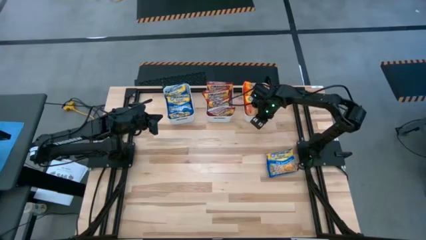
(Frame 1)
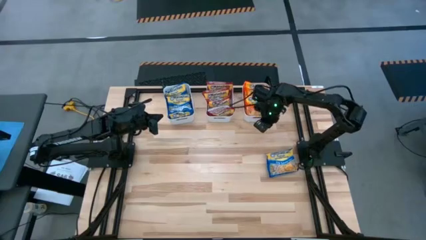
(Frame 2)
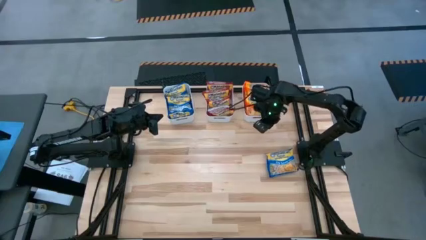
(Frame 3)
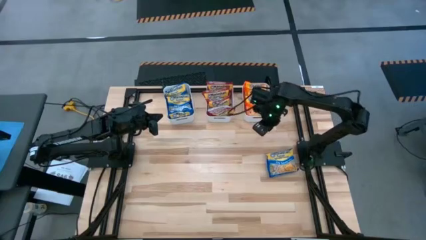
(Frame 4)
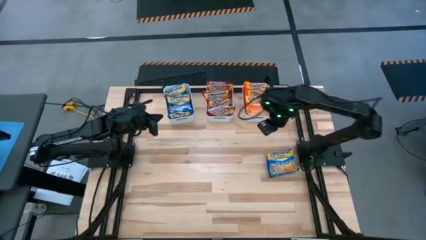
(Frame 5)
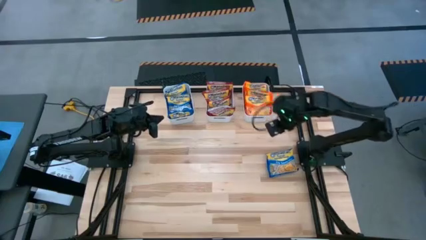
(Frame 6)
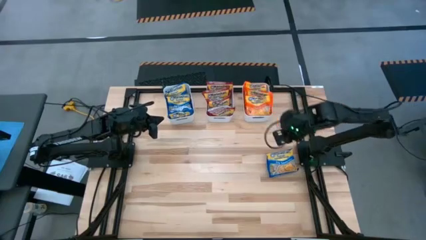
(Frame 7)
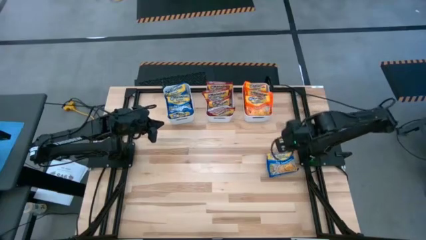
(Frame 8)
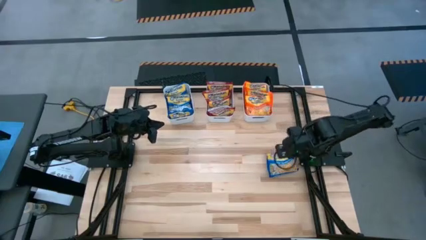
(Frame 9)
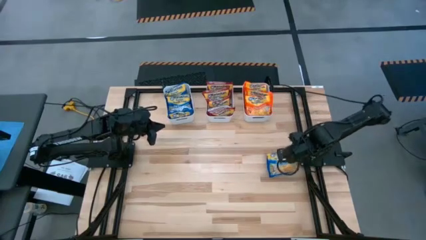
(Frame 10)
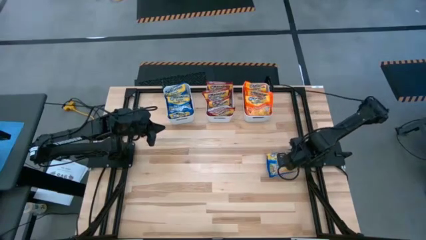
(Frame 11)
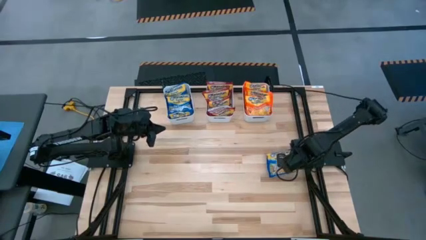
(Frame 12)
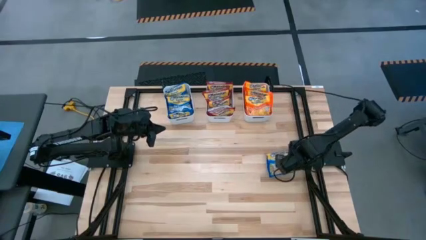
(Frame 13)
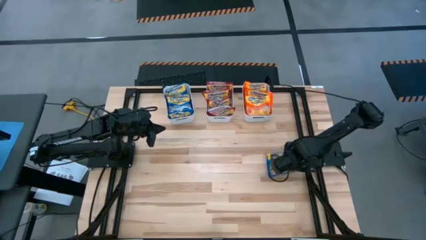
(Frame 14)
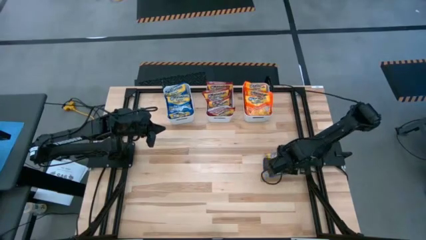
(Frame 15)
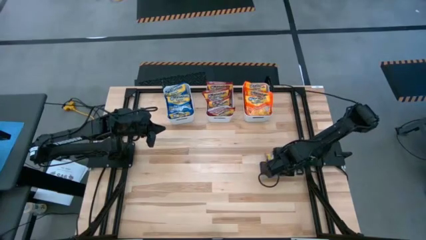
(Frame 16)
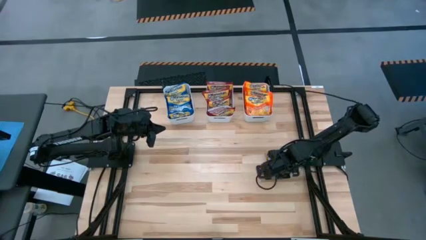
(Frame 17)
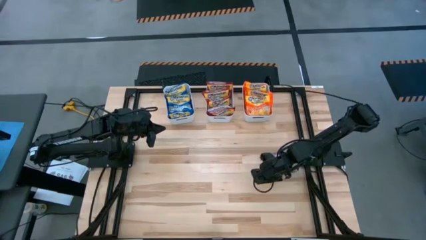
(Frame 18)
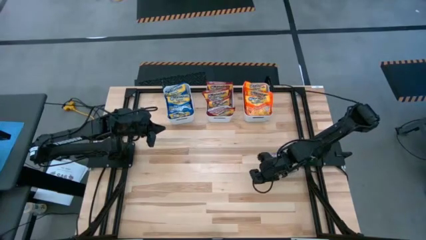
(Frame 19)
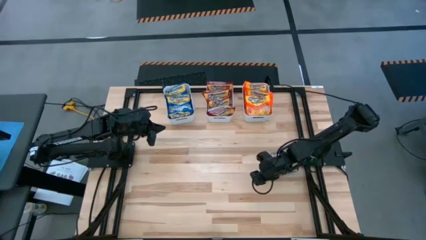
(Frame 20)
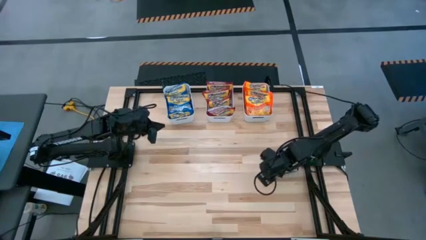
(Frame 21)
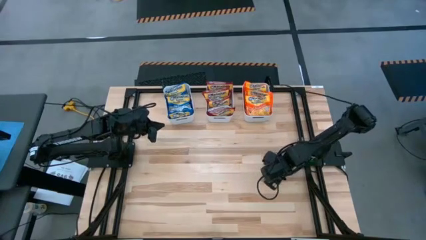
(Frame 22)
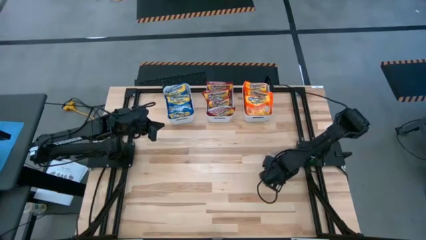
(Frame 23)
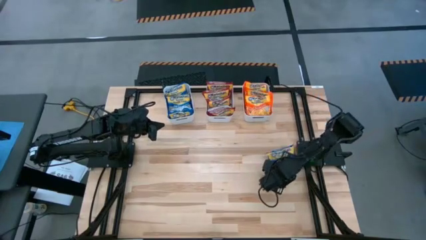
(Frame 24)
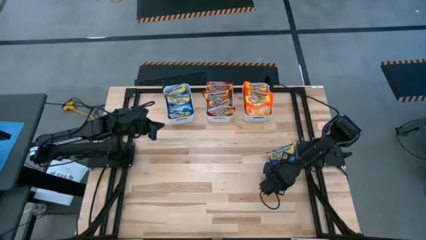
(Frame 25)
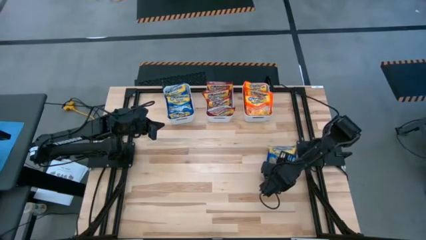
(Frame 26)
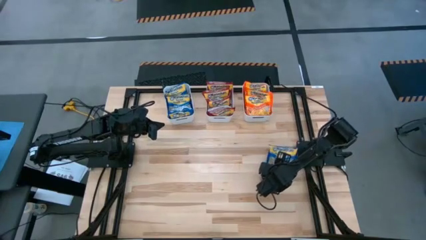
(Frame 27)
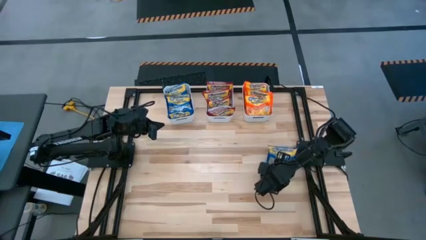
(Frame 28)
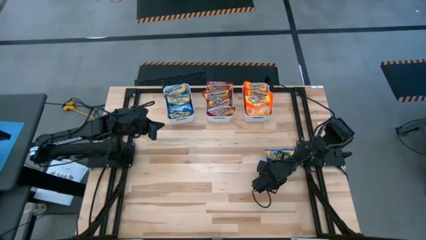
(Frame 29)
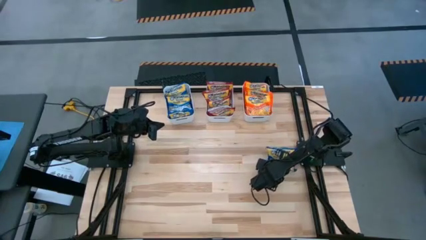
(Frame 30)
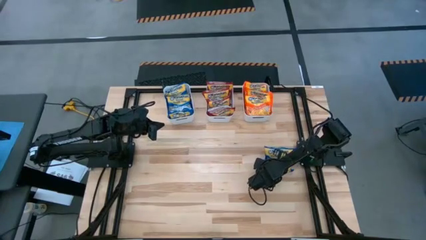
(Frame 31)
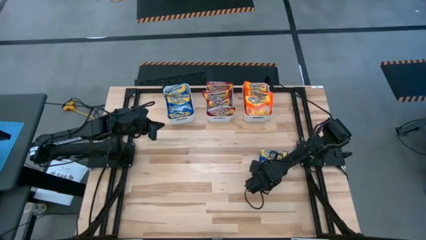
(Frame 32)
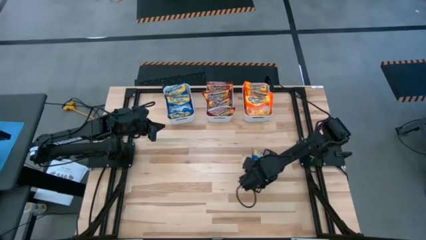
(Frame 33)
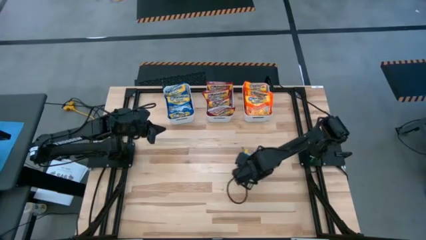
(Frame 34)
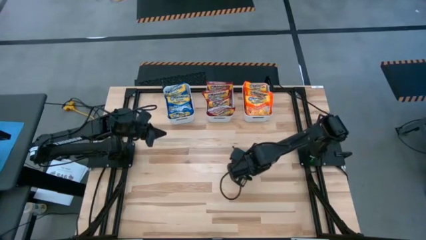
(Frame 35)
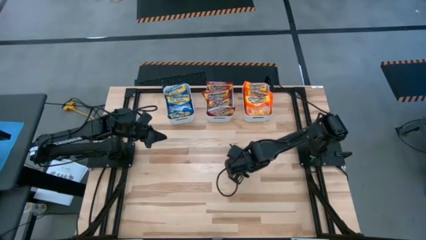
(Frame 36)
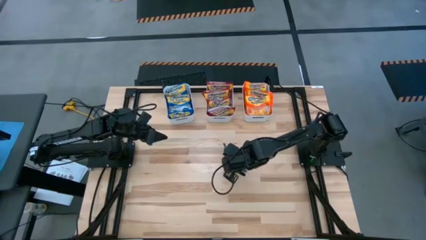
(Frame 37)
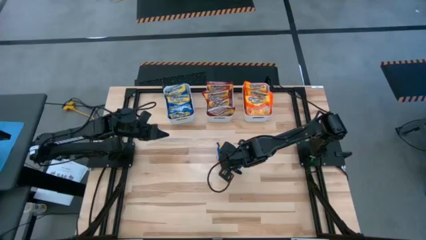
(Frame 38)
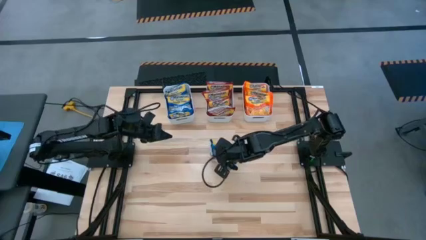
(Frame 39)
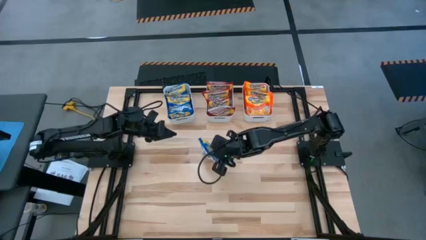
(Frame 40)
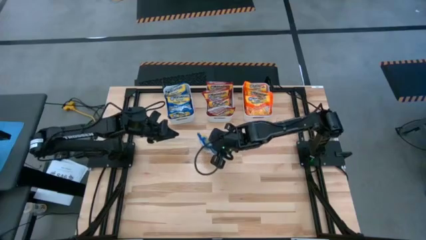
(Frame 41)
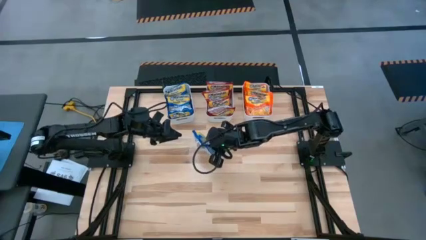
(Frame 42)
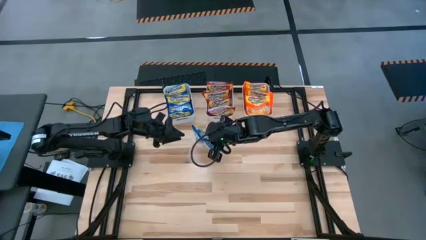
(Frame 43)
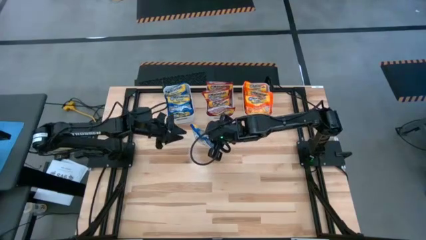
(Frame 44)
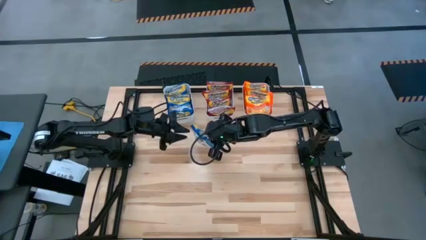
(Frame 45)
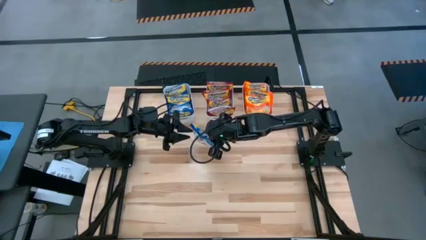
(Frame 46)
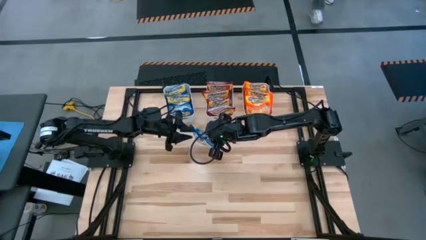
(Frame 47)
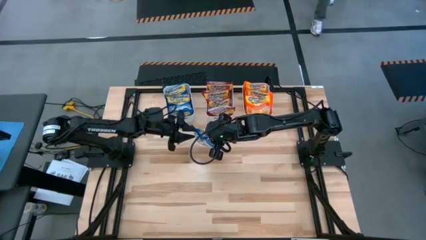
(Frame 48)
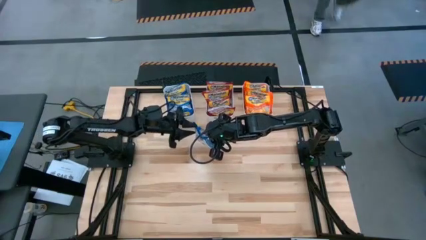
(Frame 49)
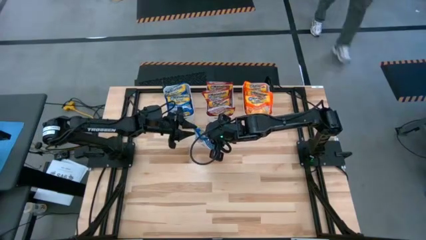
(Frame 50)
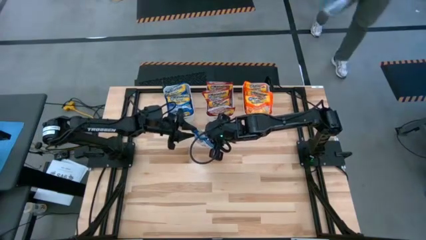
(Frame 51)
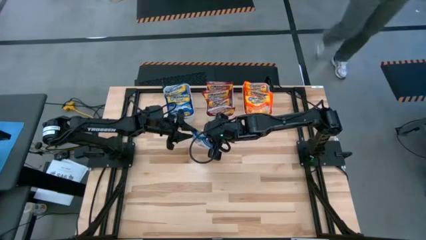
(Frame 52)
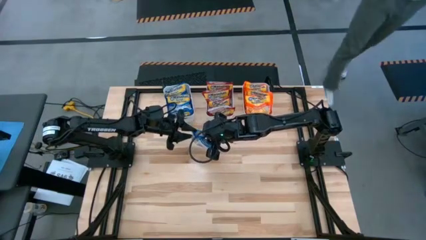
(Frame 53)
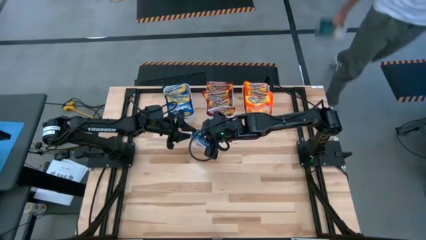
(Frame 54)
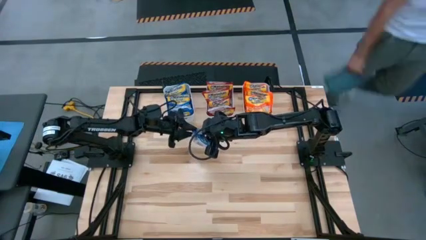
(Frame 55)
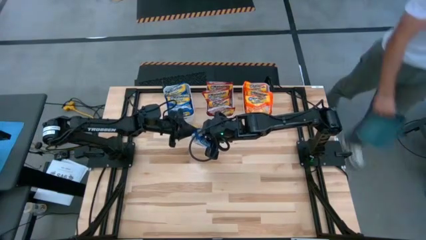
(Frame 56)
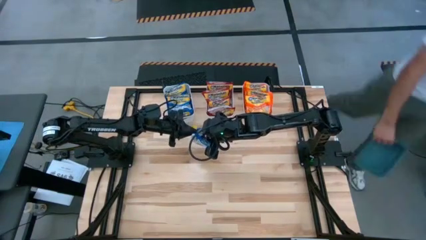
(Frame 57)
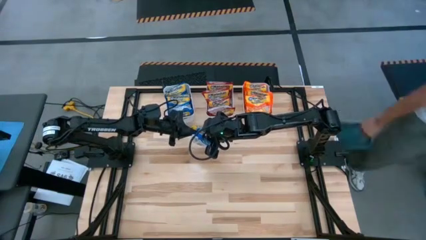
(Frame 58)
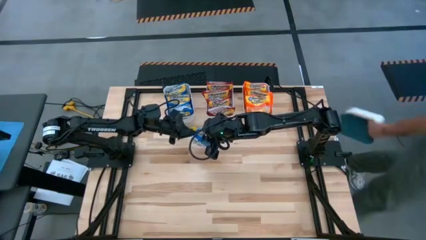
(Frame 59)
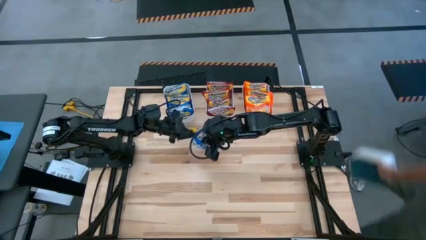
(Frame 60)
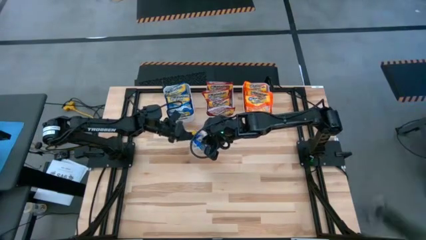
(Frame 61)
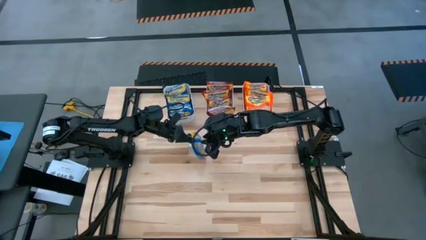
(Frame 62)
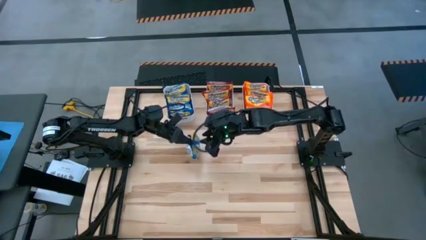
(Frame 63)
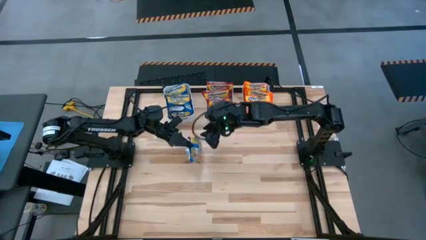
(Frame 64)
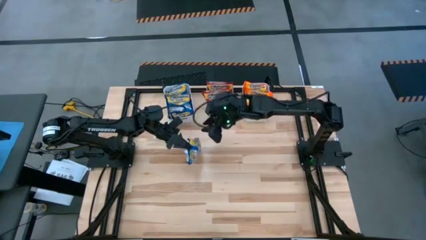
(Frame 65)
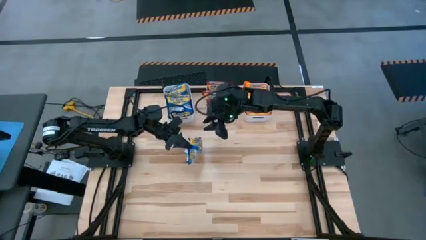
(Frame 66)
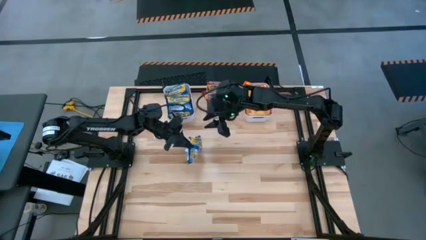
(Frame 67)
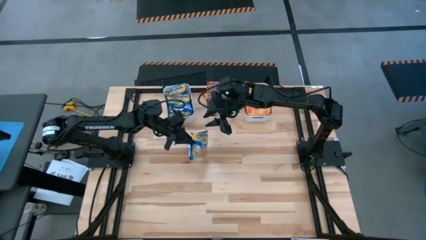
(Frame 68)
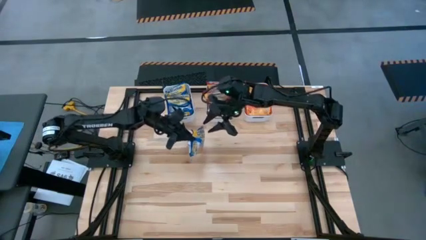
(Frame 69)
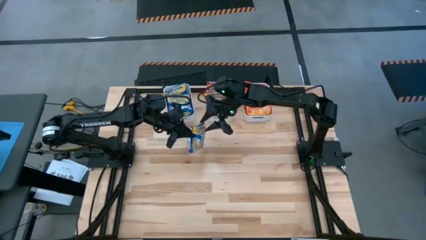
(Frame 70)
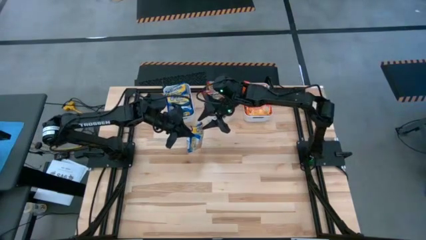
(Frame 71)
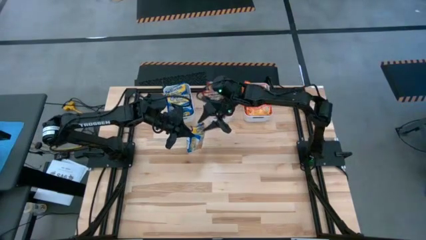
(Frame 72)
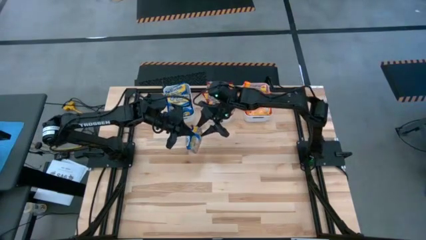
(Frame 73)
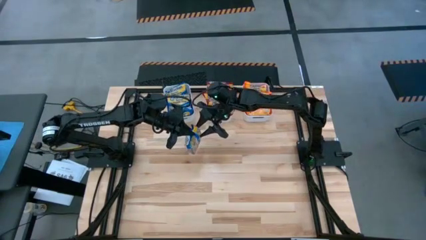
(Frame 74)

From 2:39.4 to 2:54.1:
Task: Sort Maruchan noodles
Put the blue noodle pack into the left white bin
